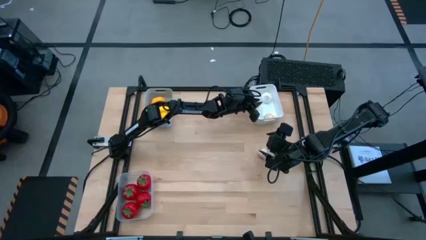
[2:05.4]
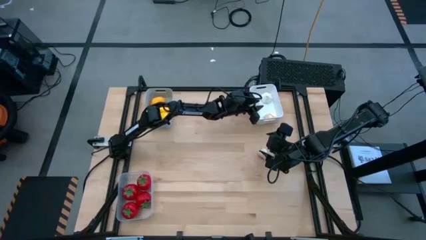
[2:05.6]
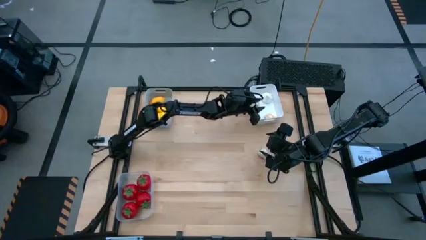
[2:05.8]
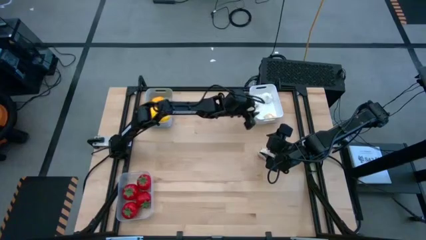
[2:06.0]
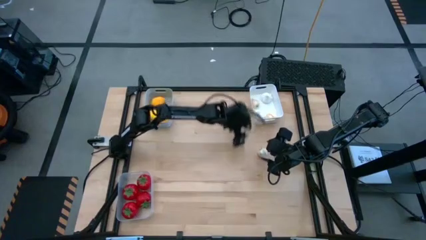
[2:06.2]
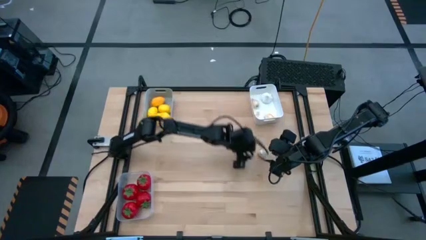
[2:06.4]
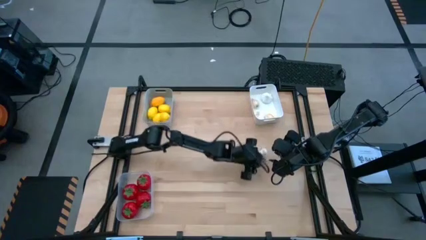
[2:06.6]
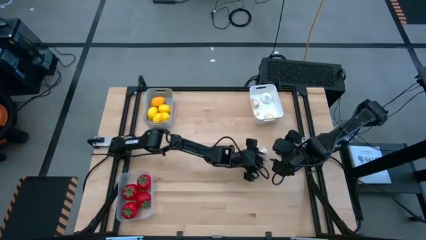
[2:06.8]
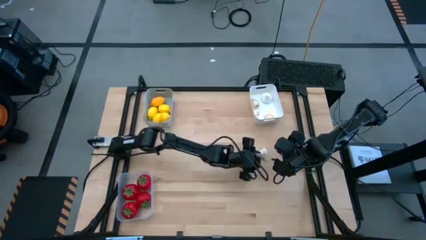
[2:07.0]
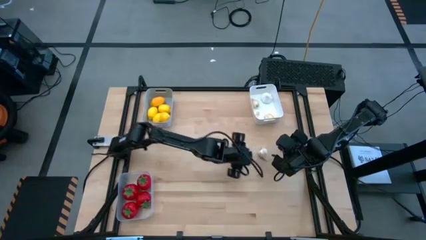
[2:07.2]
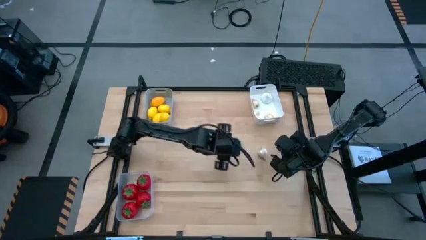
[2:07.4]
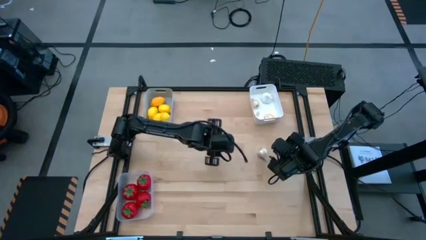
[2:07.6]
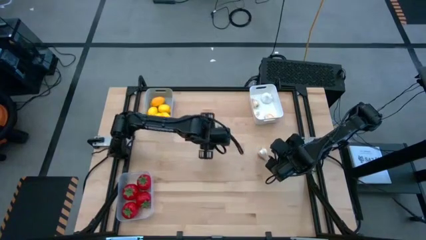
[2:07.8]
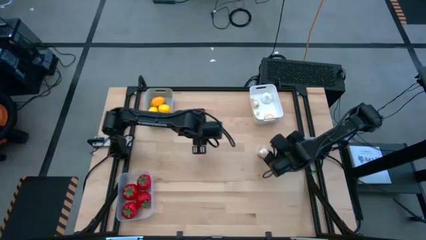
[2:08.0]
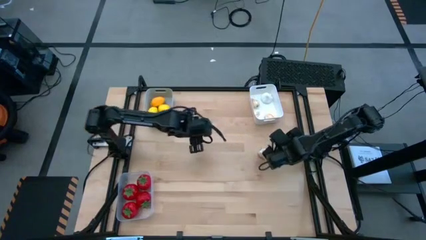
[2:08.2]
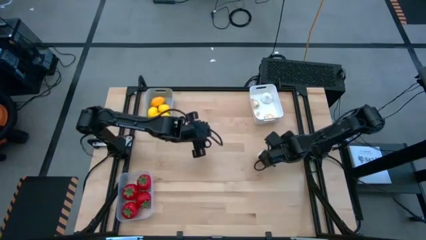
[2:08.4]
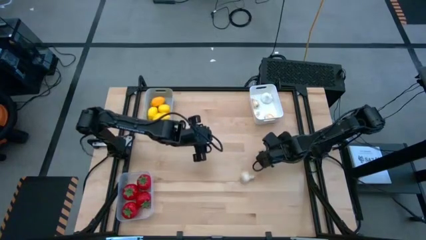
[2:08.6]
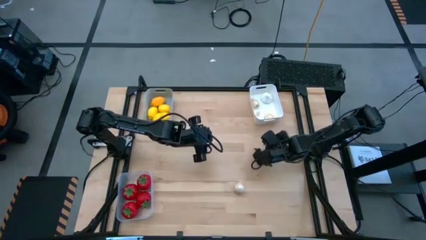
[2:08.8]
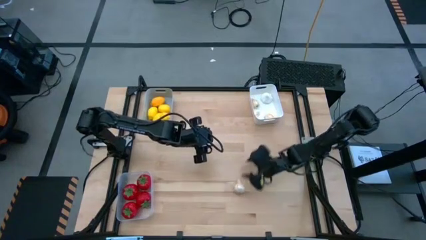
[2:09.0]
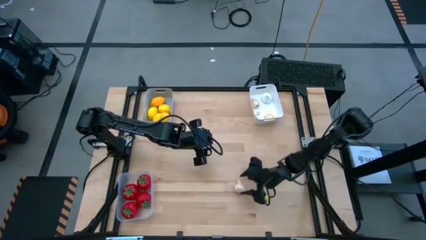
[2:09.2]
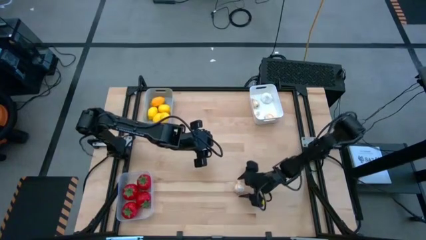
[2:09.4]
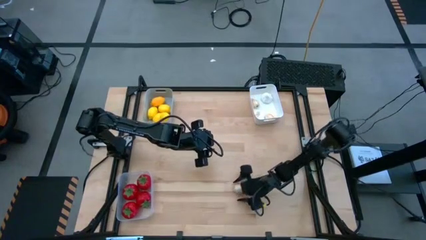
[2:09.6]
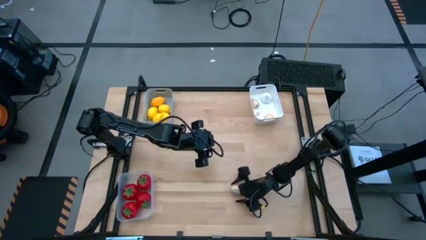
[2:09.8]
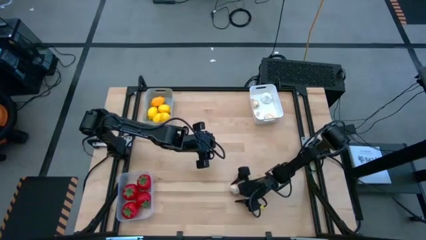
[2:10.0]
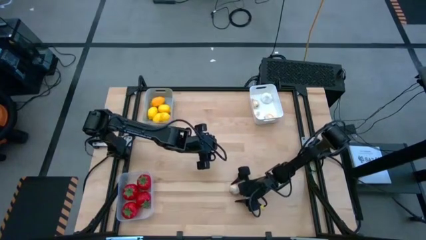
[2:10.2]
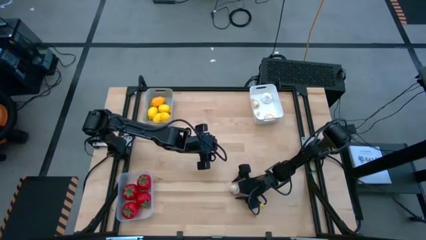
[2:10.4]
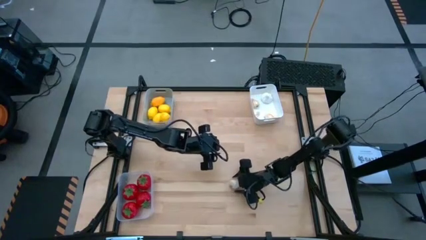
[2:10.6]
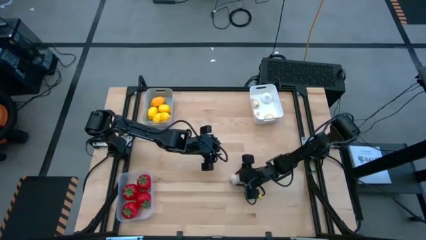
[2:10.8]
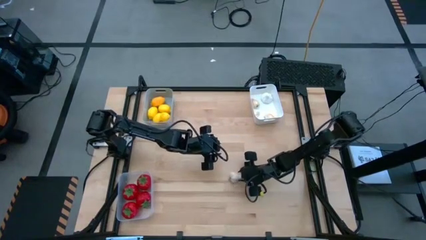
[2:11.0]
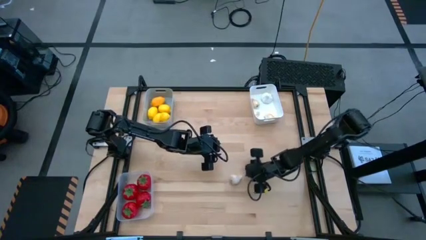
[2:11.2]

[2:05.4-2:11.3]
Task: Sort produce into baskets
Put the white garlic into the white bin

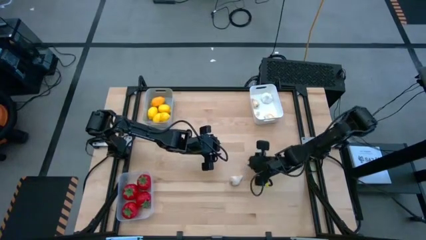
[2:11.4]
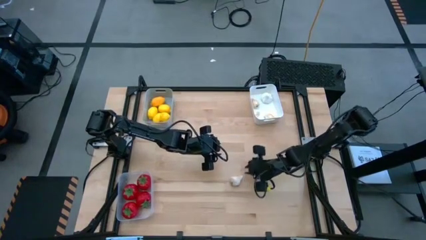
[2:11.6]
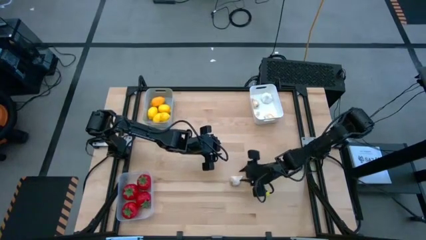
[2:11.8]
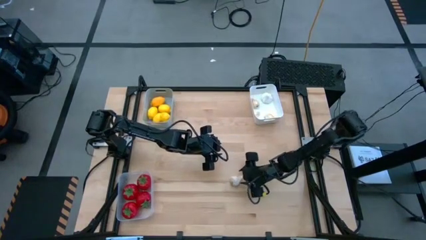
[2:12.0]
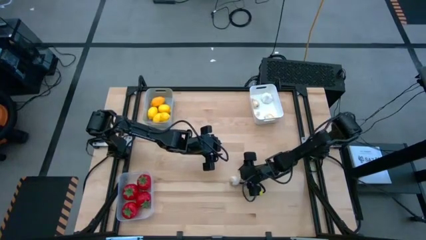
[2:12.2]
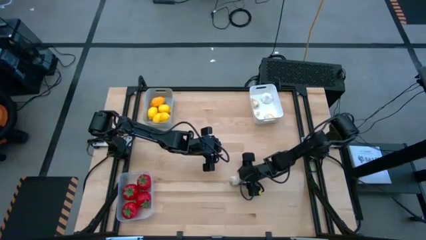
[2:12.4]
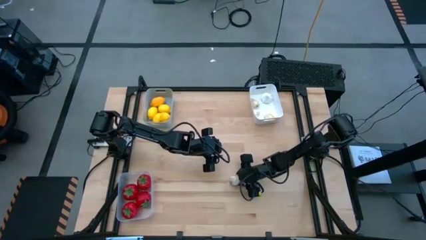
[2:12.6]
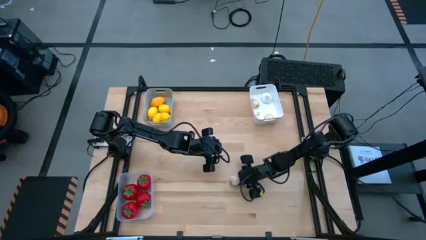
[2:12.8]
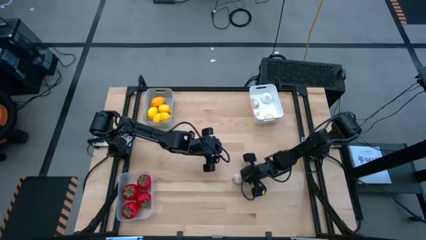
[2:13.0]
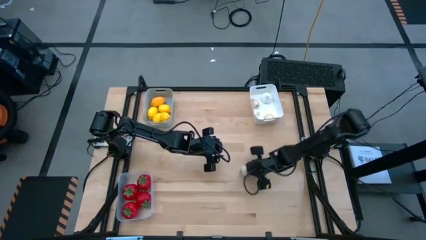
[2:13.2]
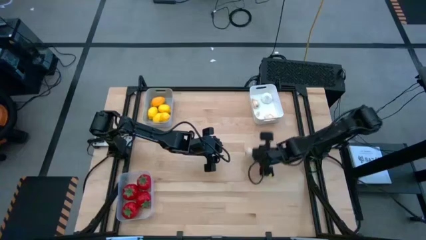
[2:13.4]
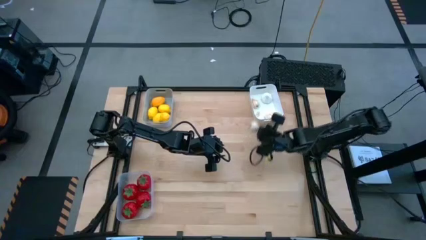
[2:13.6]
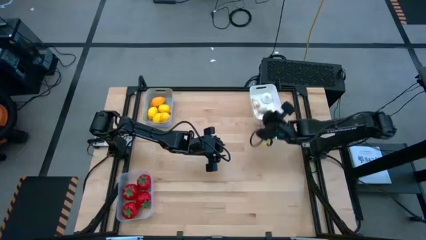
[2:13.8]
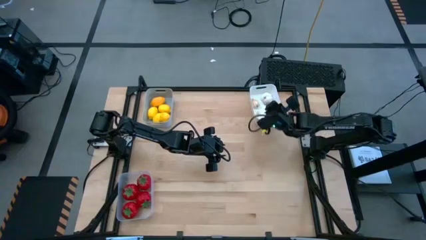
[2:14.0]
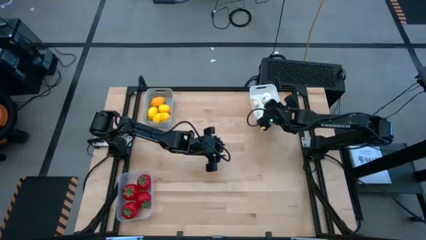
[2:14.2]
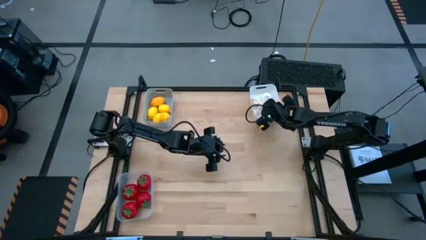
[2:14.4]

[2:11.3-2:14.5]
Put the white garlic into the white bin
